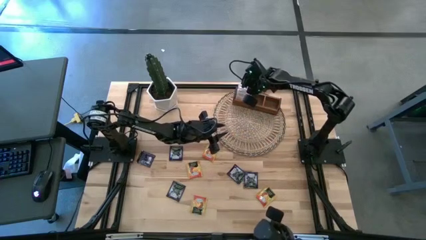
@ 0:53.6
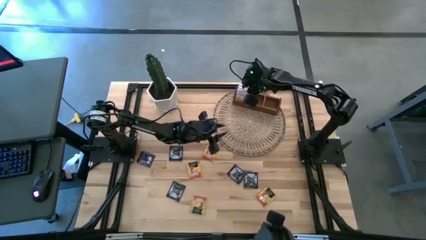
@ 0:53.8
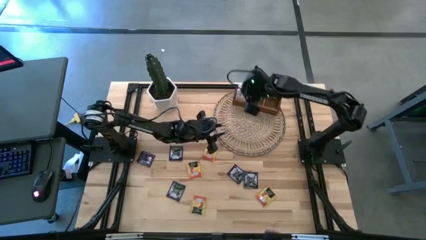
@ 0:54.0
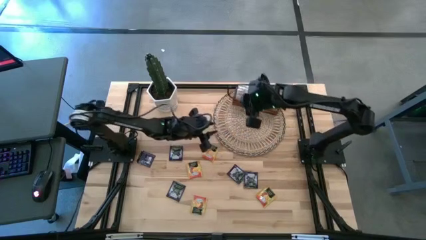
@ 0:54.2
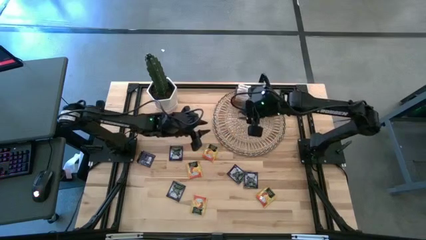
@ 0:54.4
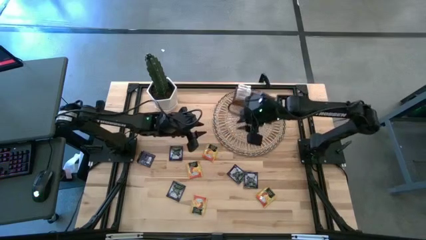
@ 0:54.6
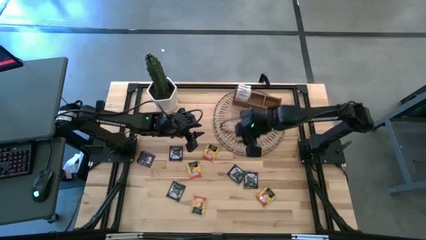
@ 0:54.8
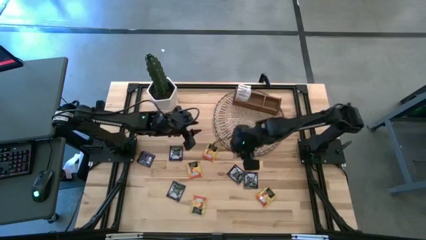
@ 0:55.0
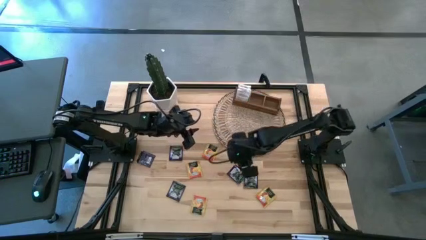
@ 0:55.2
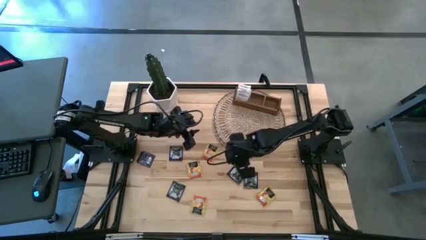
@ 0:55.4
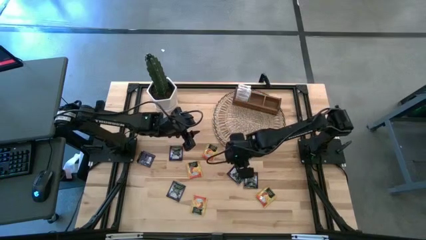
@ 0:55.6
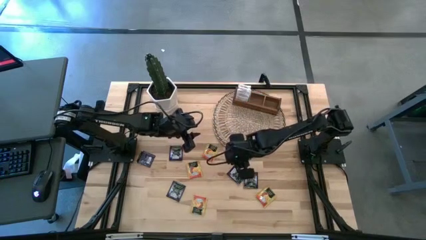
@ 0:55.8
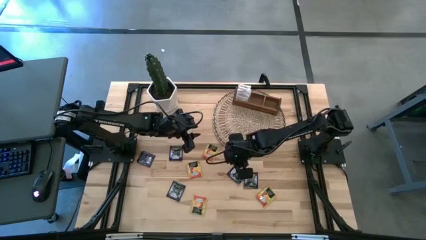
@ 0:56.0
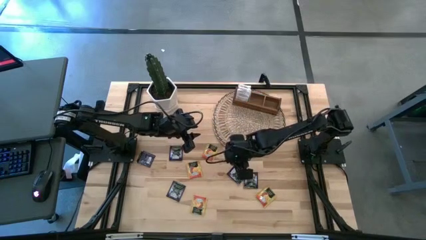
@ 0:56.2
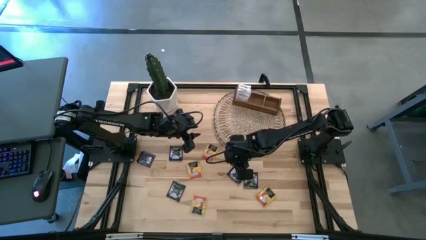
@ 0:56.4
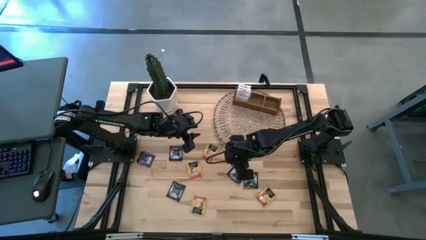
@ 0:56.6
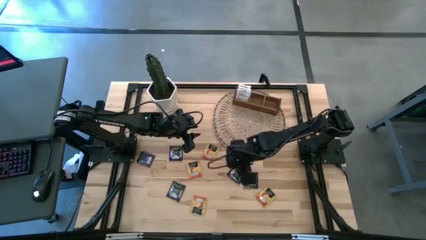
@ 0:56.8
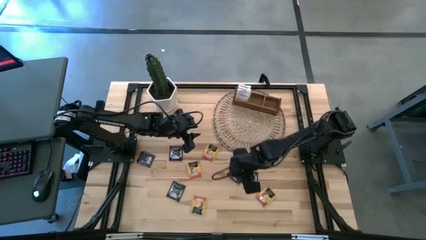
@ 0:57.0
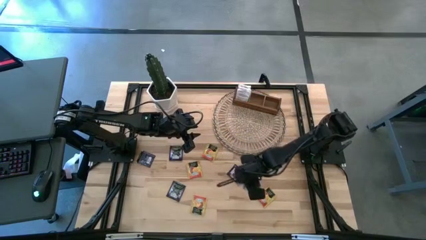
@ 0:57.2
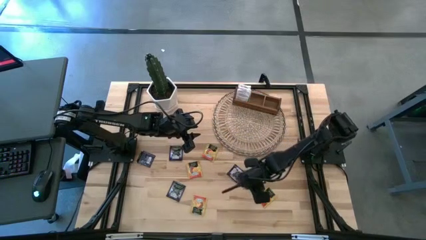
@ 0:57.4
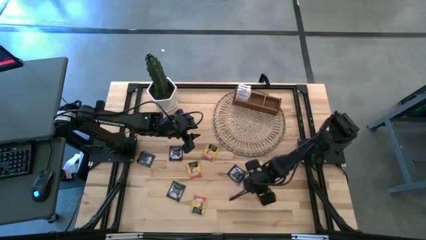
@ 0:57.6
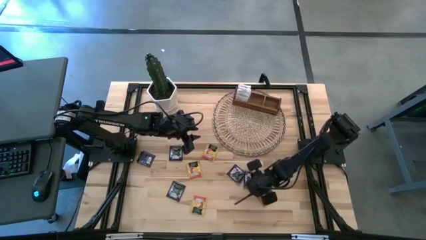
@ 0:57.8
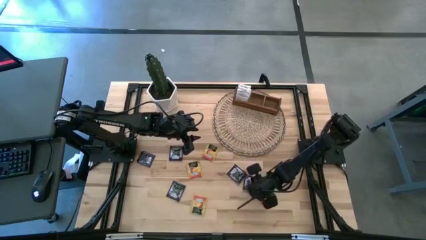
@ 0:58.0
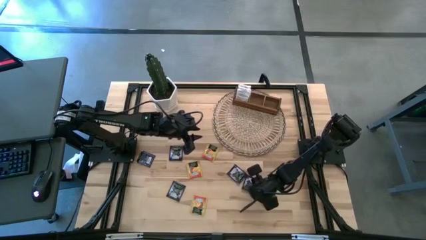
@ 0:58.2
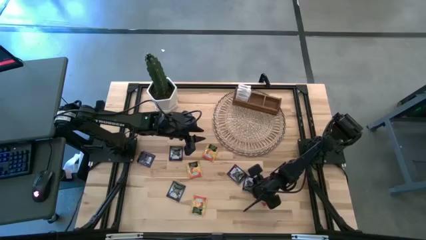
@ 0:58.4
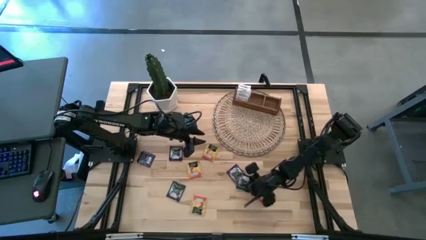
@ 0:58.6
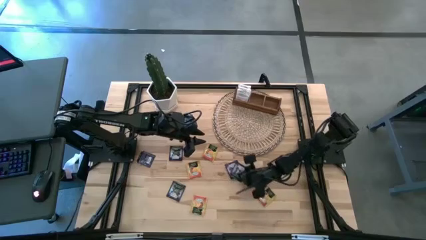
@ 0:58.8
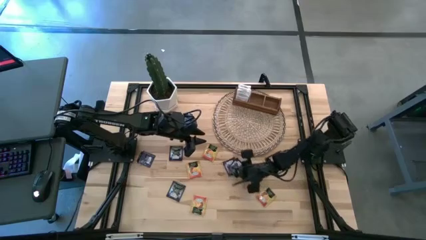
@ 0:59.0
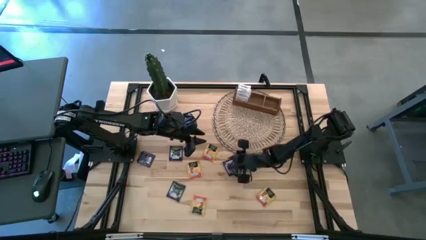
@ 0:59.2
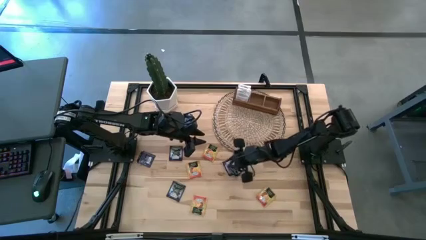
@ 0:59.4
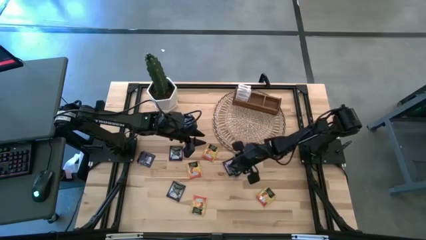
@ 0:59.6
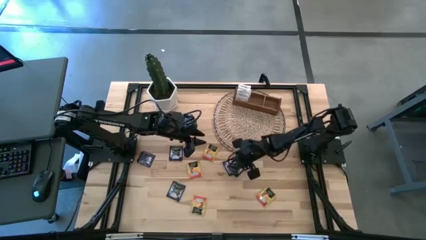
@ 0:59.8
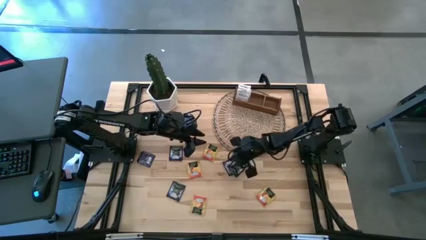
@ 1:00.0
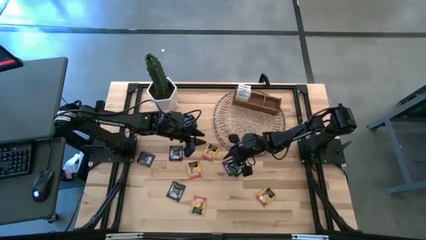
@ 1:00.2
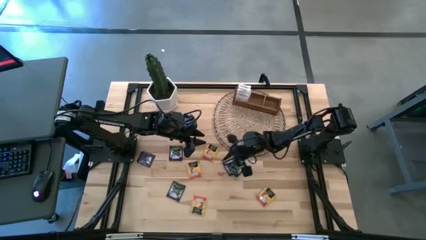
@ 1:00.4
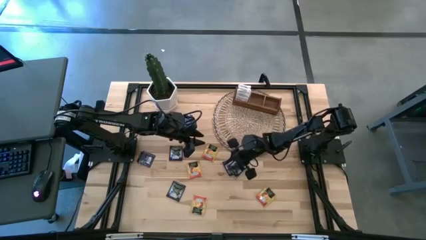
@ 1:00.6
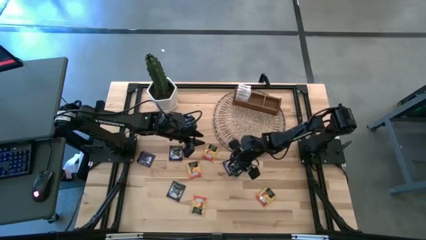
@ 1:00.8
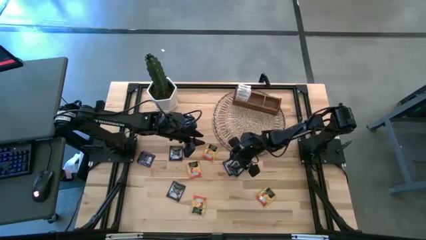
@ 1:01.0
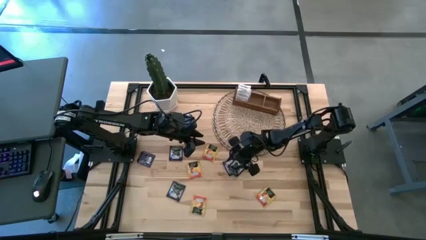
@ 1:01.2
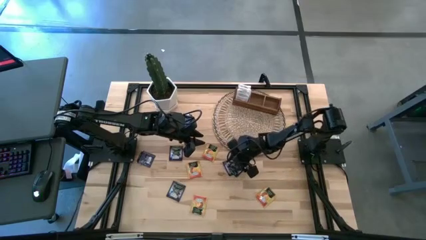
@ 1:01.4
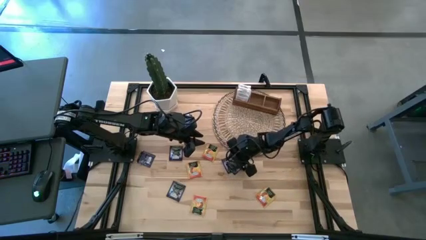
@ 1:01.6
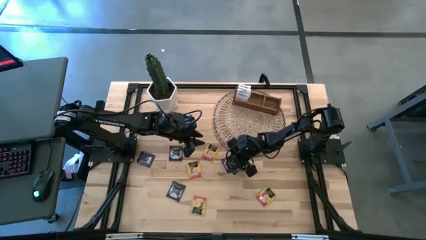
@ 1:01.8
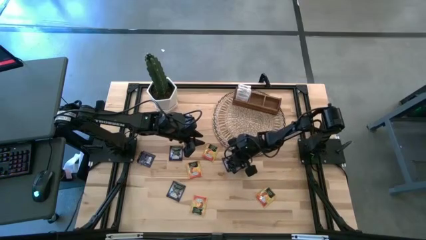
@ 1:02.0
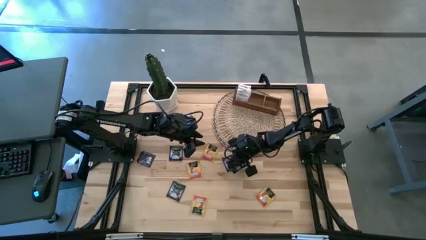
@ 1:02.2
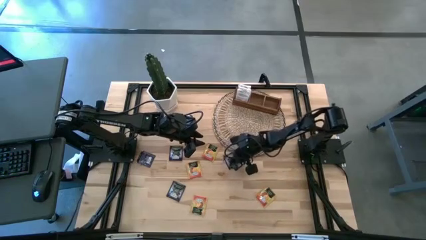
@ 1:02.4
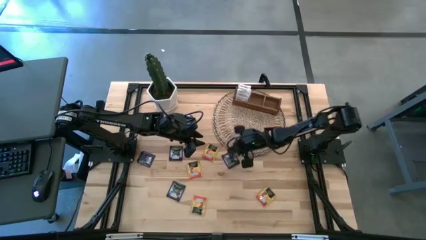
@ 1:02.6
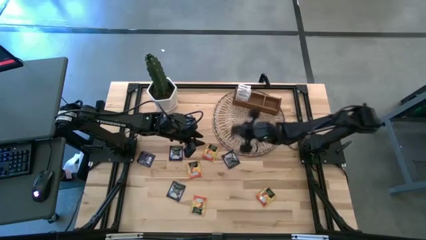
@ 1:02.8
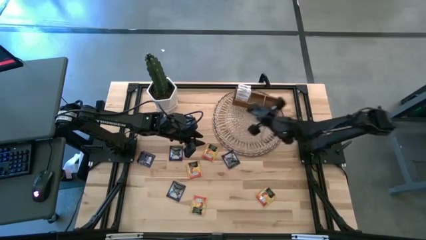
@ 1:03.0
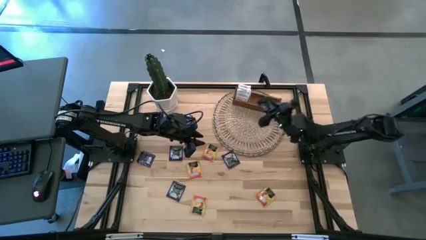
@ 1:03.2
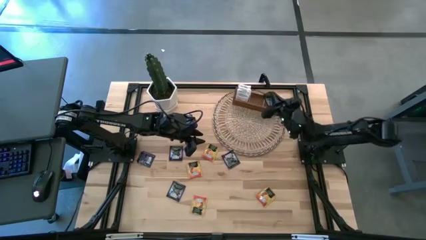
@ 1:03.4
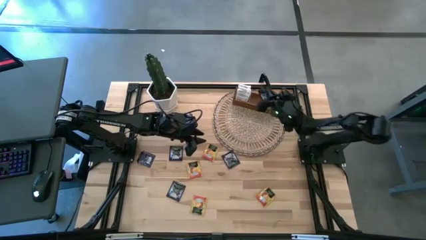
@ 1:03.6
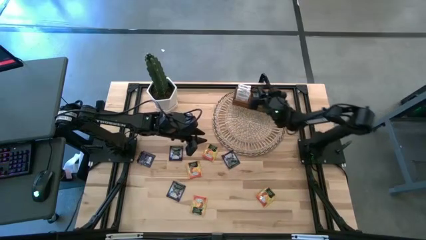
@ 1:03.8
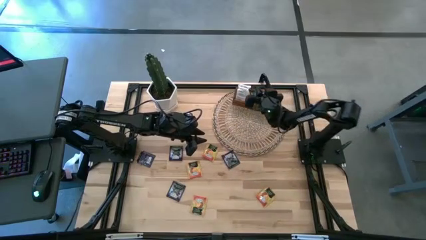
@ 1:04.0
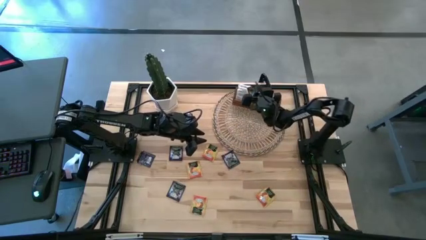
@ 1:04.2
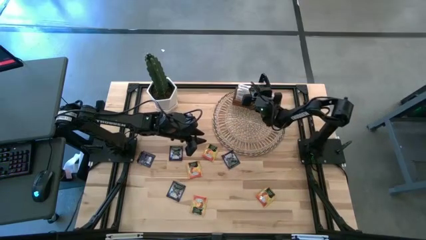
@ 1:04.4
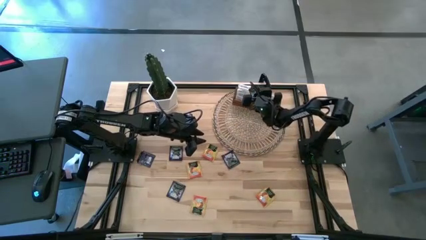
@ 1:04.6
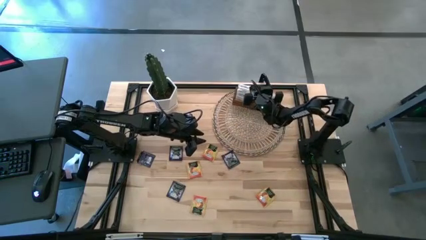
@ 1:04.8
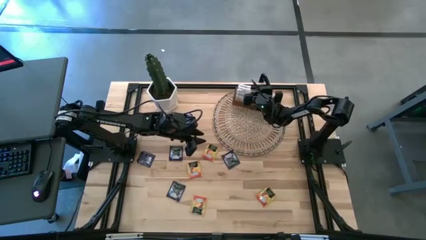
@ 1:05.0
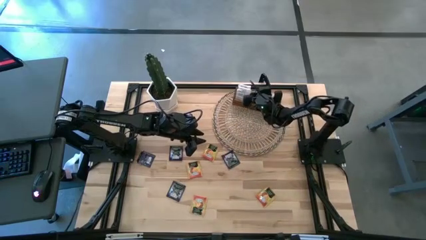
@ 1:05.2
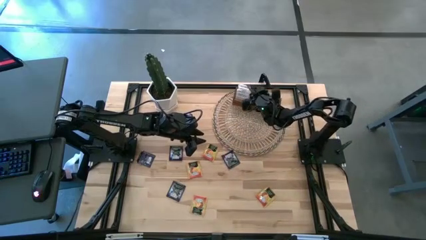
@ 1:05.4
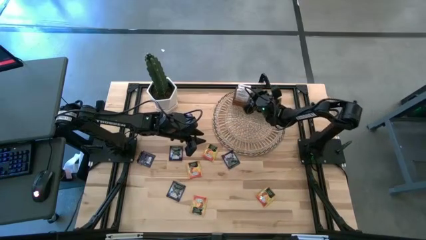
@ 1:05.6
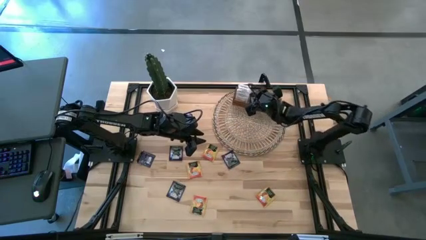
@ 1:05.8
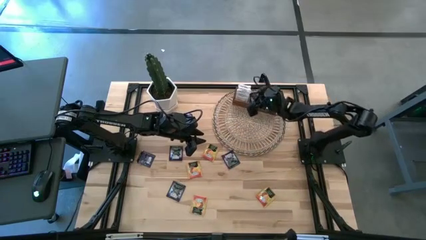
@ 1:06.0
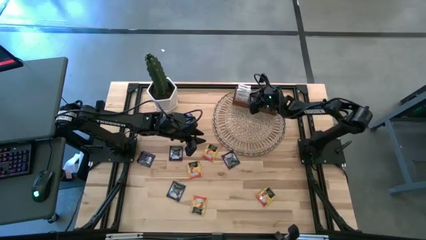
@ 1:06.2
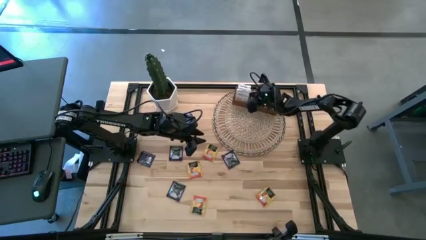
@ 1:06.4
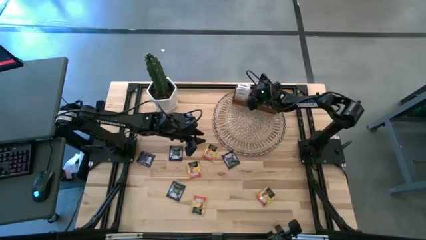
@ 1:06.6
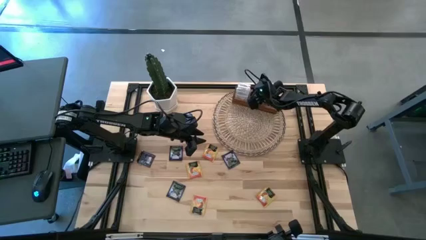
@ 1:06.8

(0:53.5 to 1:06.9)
Task: Pick & Place Tea
Put the blue tea bag into the middle section of the wooden organizer
